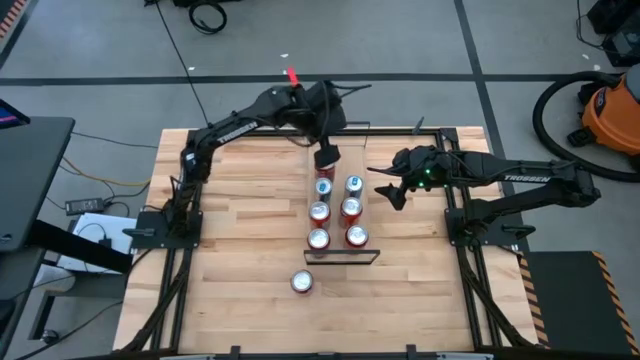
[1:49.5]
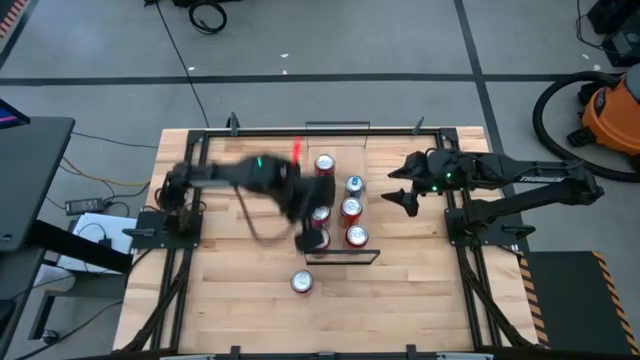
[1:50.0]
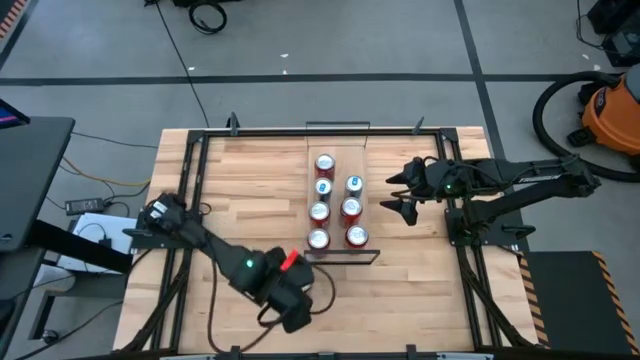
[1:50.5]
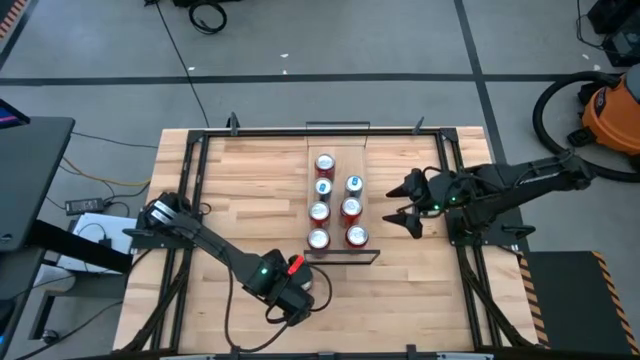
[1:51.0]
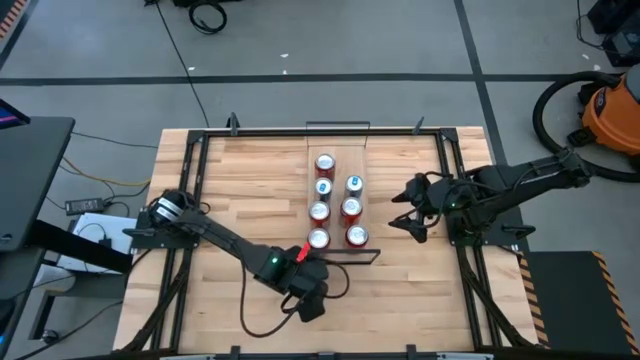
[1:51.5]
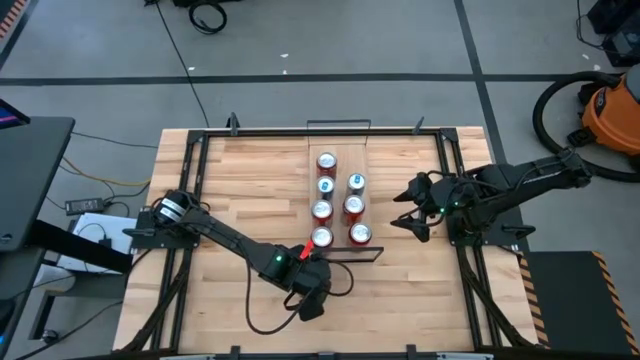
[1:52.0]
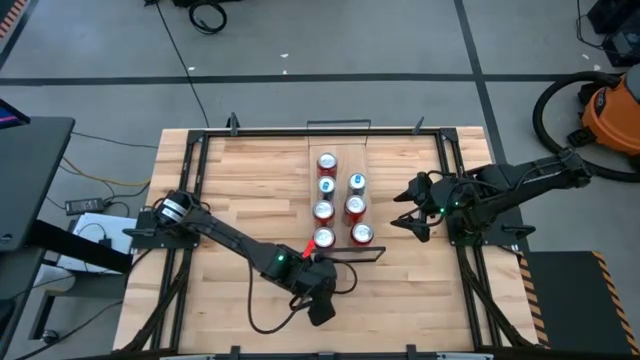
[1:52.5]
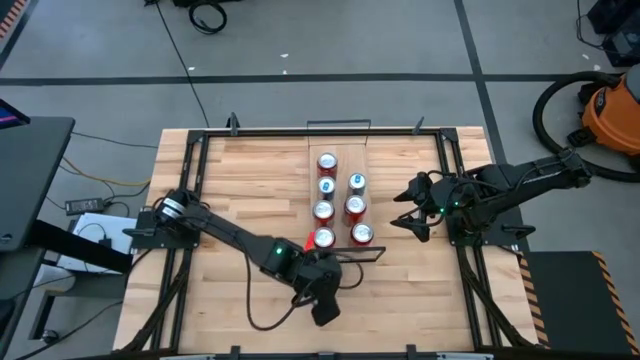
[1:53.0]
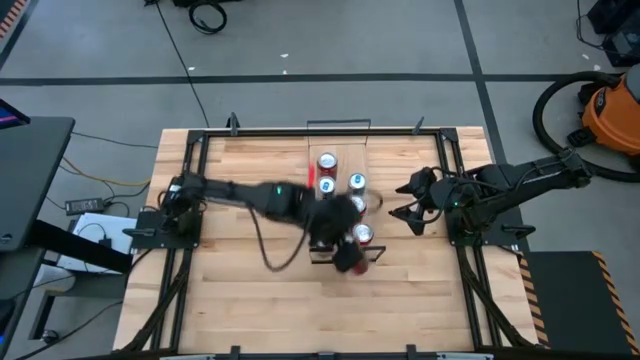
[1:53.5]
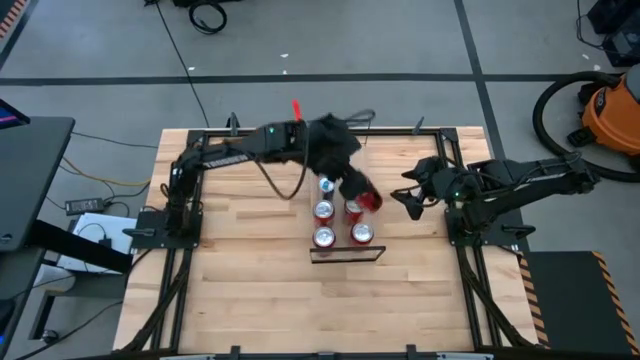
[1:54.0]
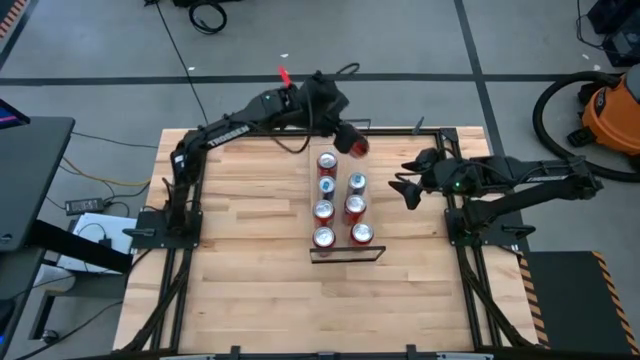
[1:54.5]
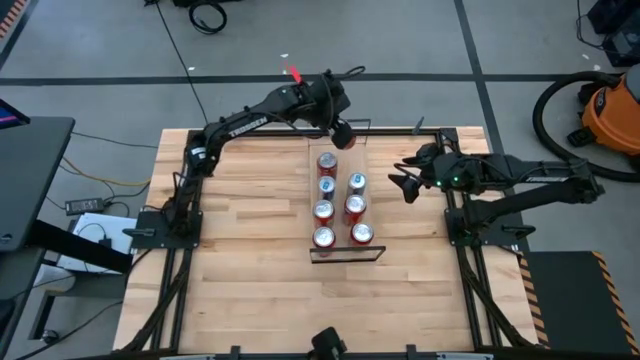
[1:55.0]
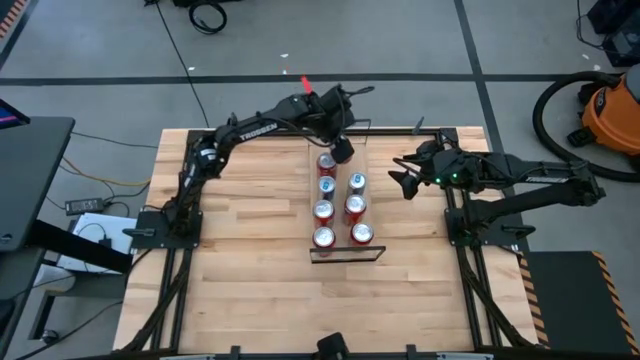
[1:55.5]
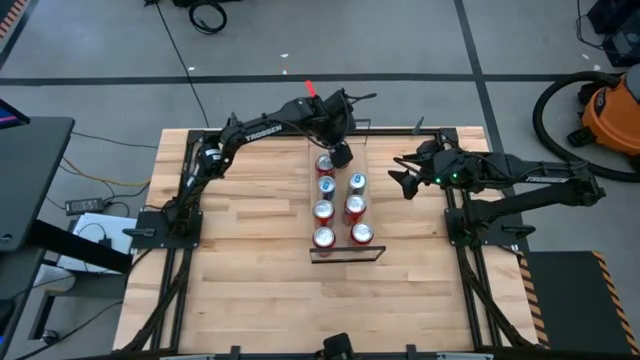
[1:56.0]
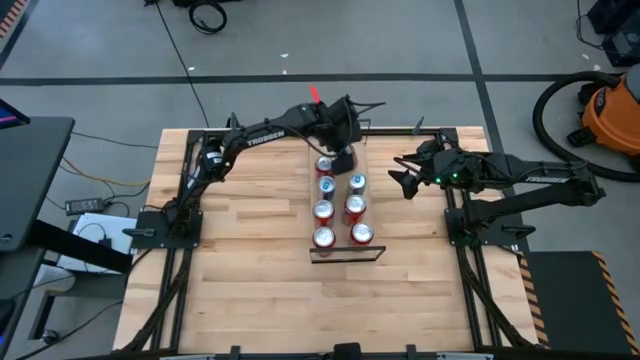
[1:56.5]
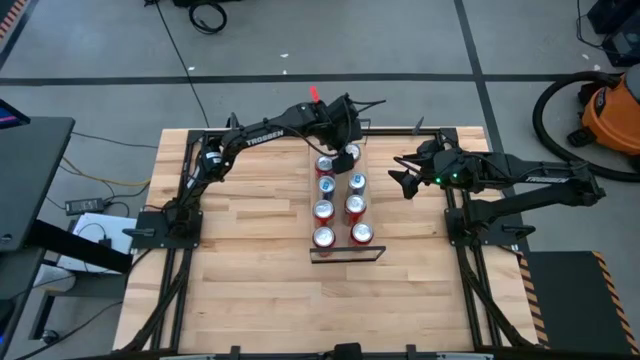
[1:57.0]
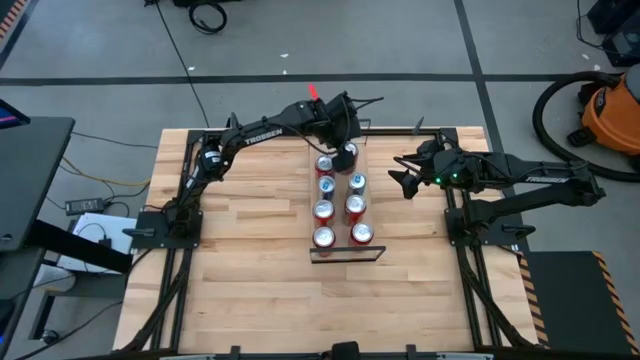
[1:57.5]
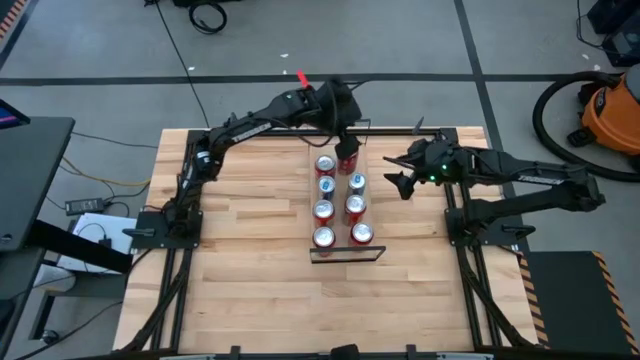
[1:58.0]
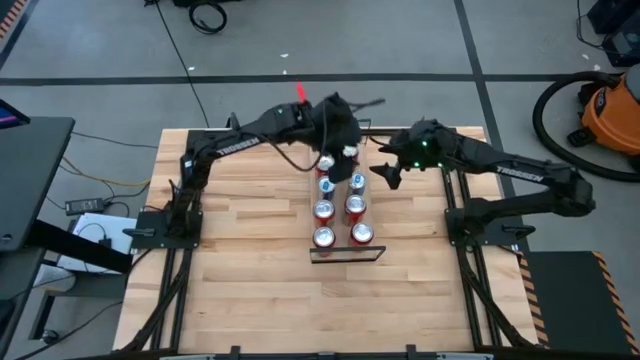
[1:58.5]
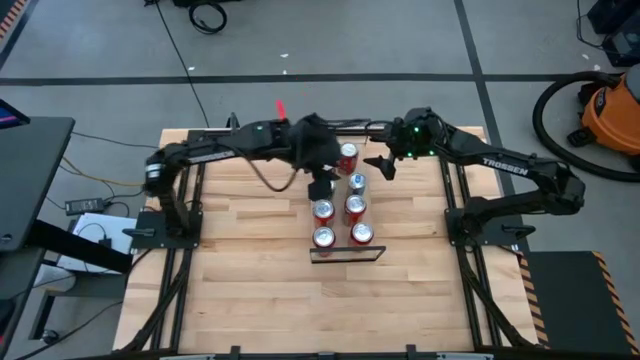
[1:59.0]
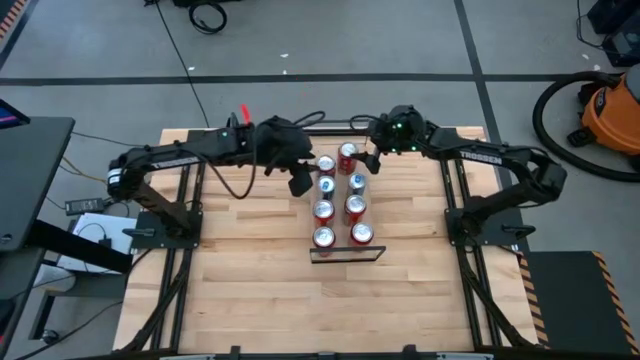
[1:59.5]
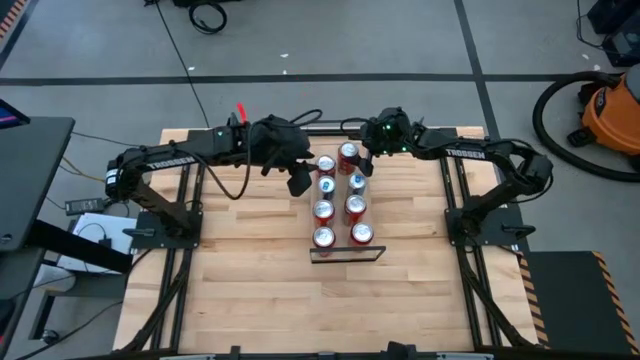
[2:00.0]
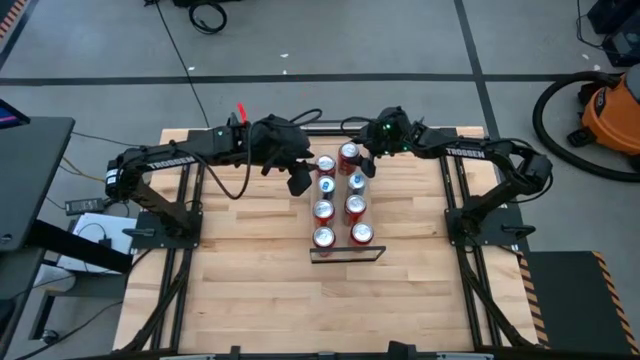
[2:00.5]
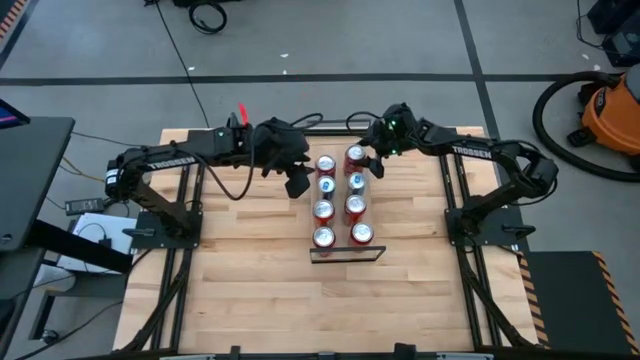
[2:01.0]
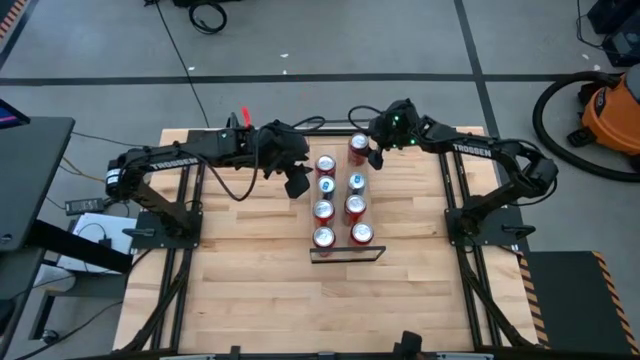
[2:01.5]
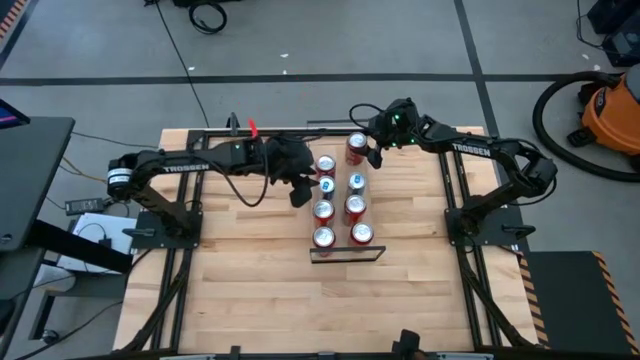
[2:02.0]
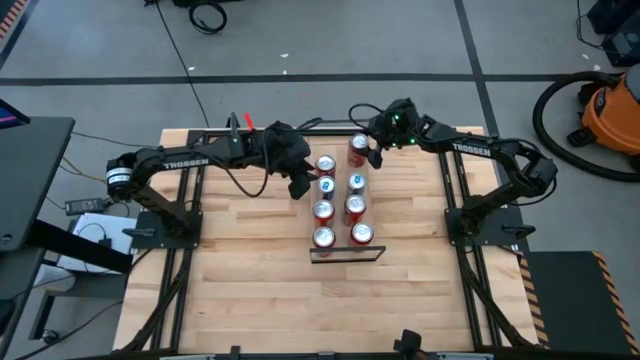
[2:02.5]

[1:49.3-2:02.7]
Task: Place canned beverage on shelf
Put the red white soda can on the shelf aligned with the other red white soda can

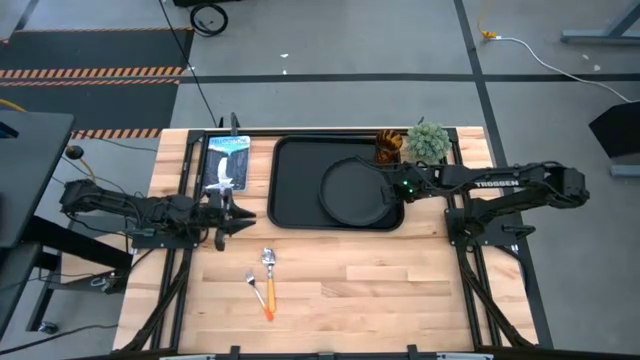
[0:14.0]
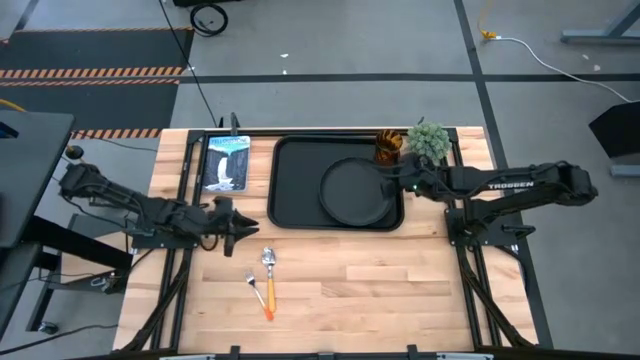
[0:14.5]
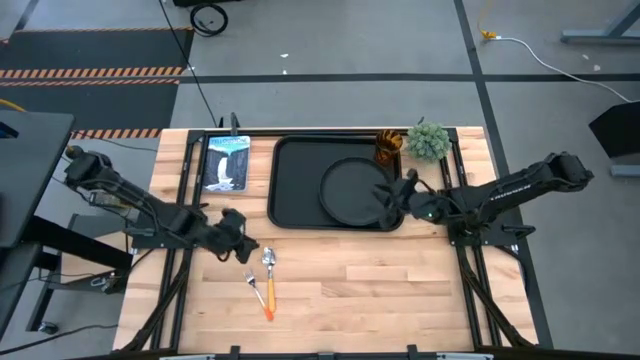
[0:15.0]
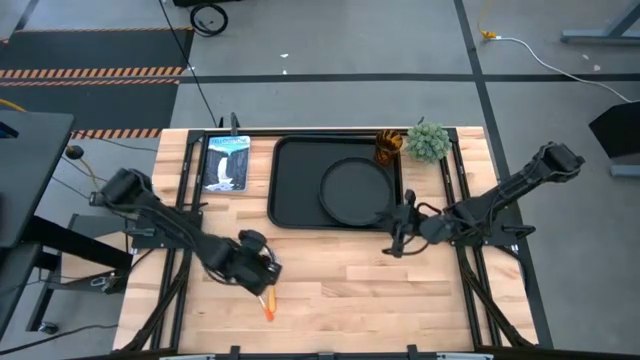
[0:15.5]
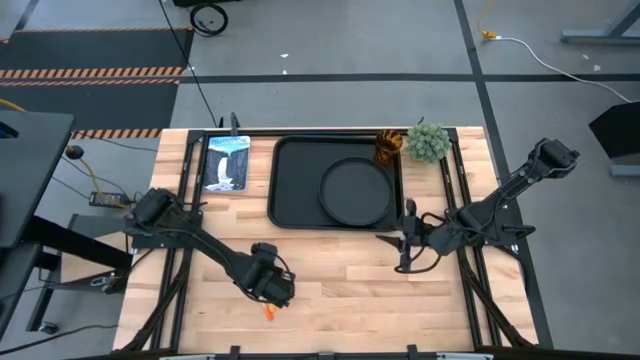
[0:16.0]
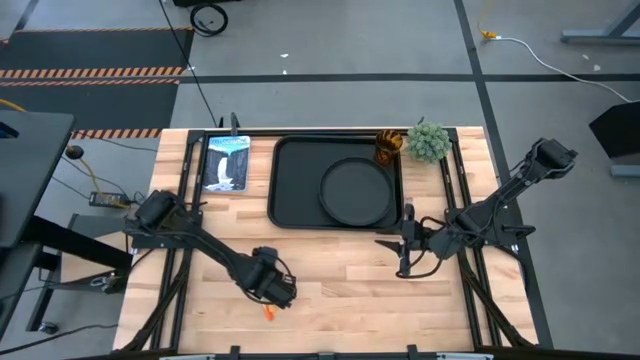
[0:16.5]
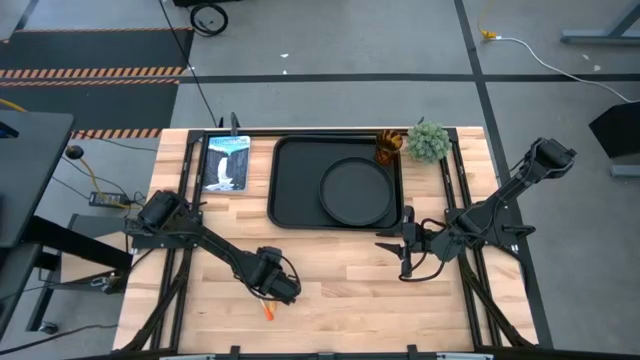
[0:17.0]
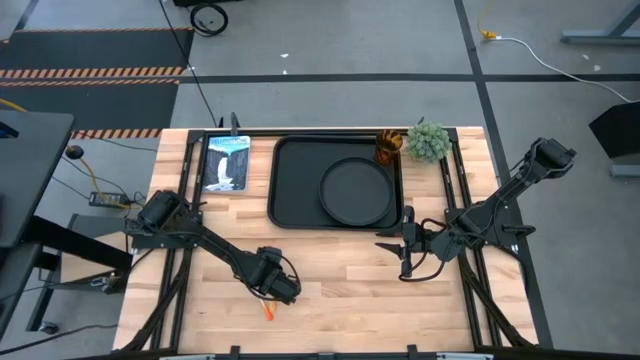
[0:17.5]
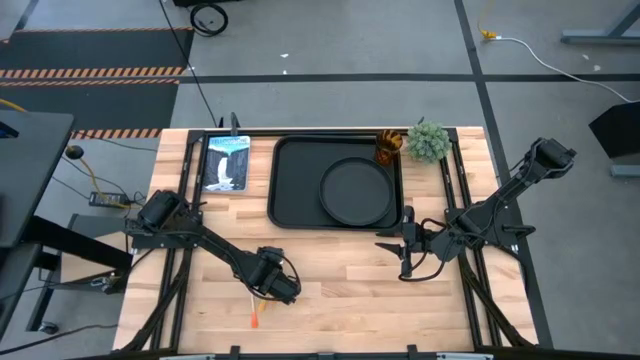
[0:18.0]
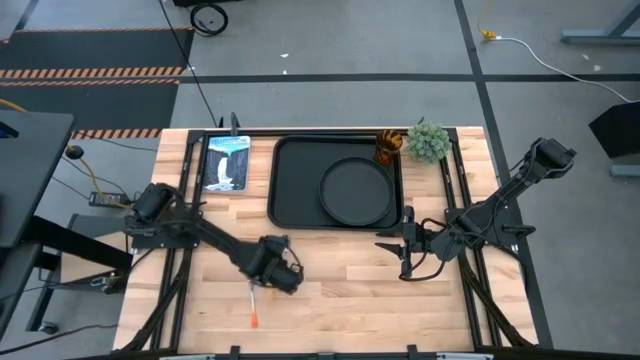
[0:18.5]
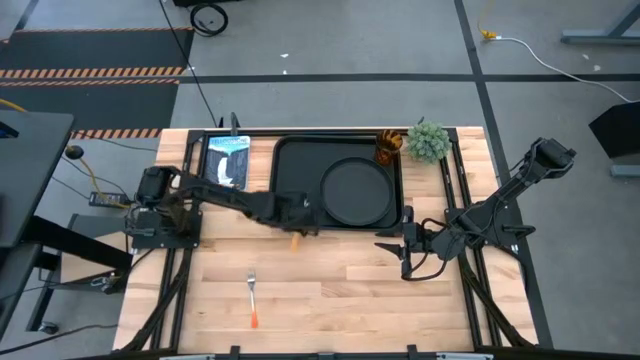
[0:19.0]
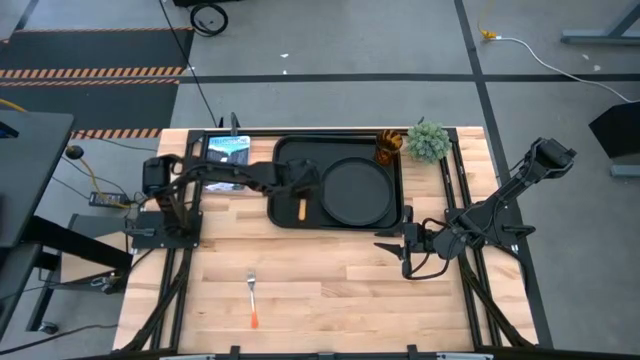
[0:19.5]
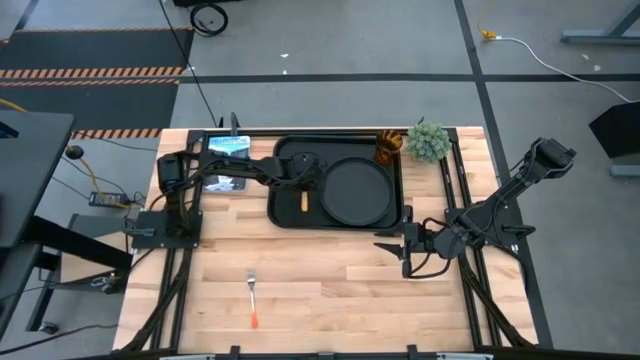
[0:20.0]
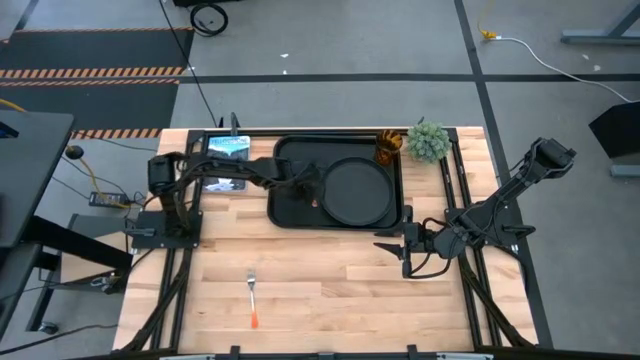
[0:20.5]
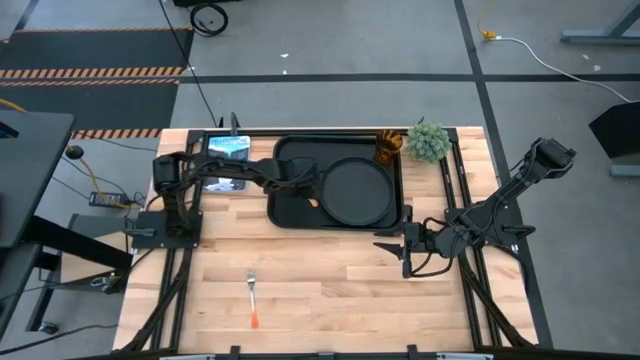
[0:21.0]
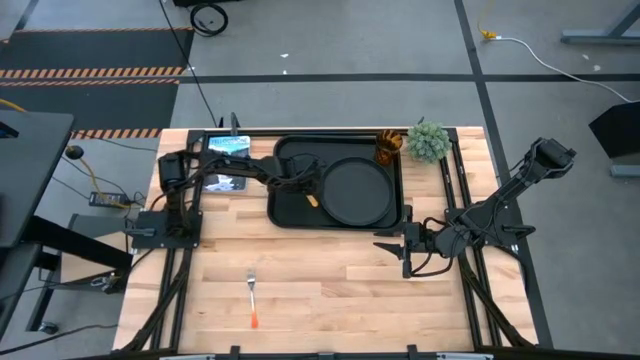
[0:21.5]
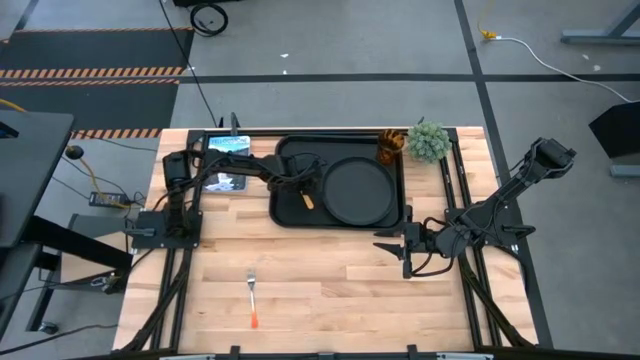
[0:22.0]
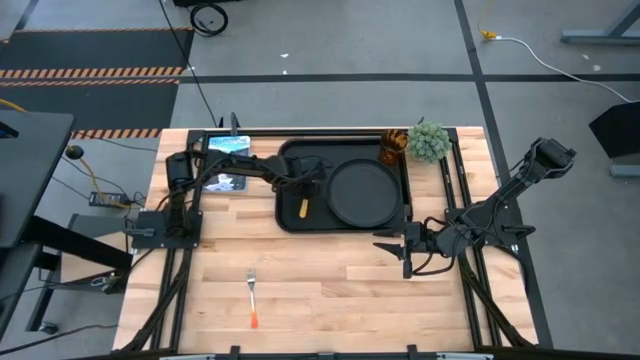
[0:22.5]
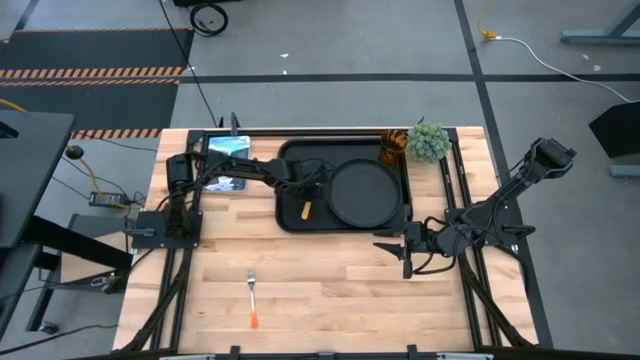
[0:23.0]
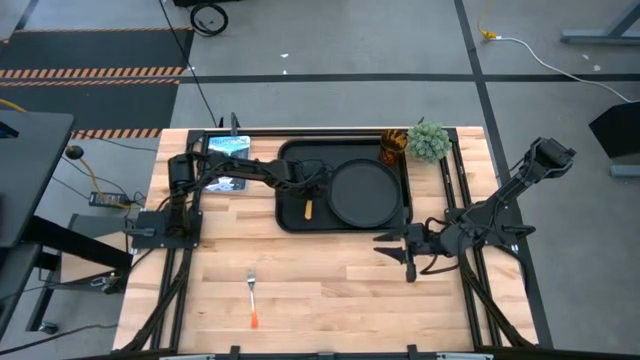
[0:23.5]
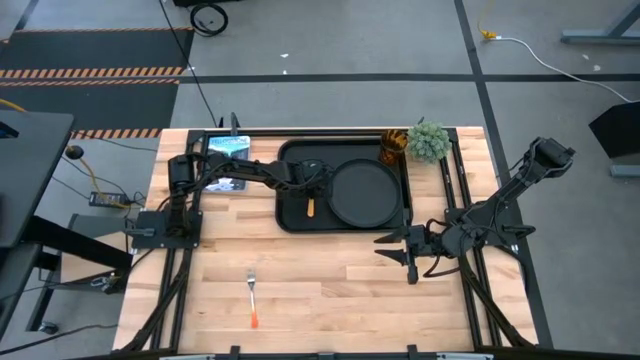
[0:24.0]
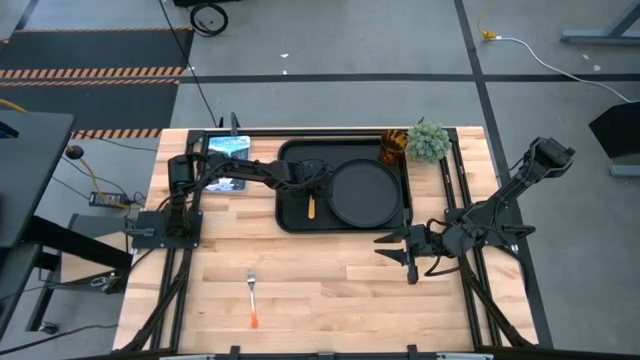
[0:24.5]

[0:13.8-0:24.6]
Task: Pick and place plate/cup/fork/spoon on tray
Put the spoon to the left of the black plate on the black tray
